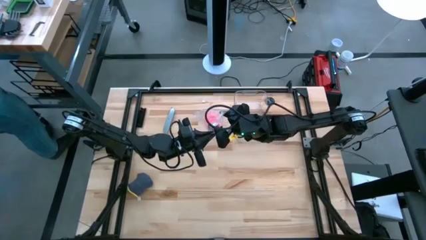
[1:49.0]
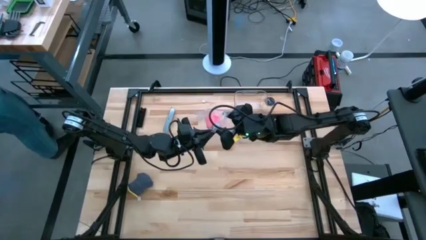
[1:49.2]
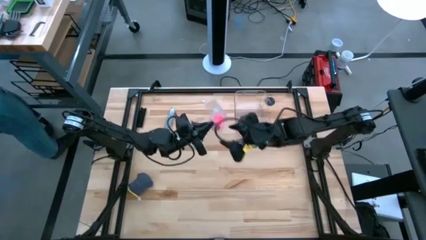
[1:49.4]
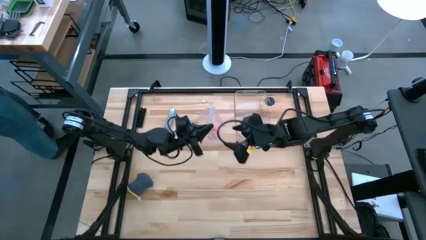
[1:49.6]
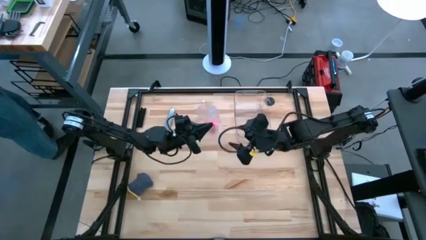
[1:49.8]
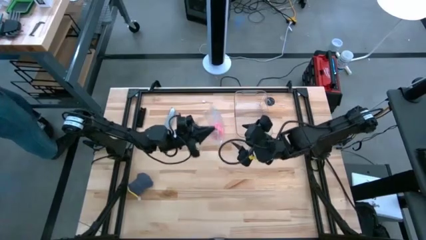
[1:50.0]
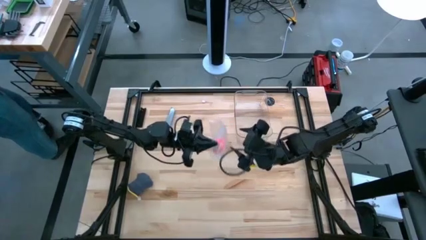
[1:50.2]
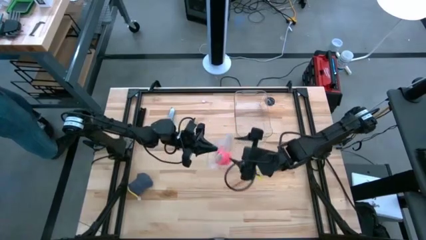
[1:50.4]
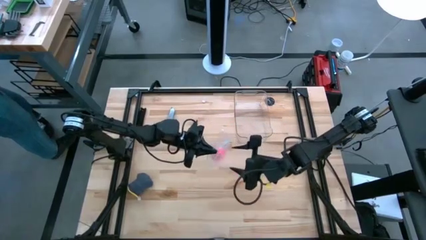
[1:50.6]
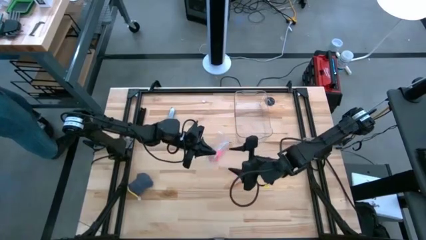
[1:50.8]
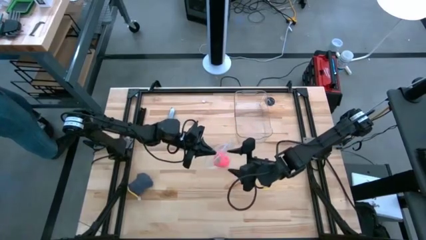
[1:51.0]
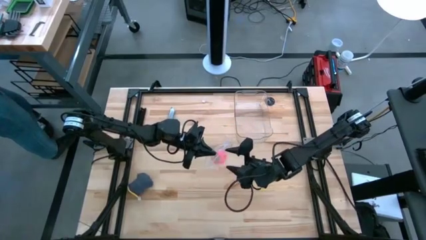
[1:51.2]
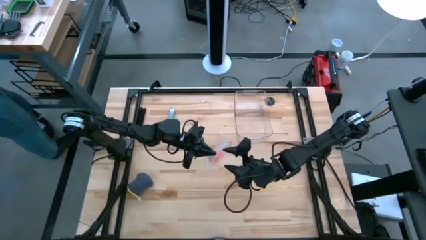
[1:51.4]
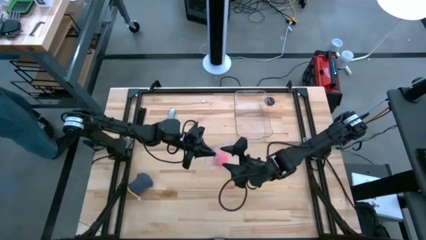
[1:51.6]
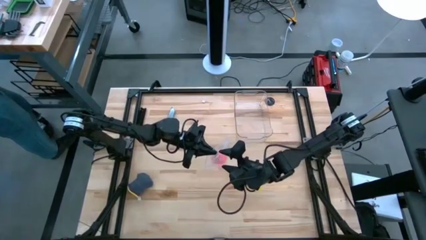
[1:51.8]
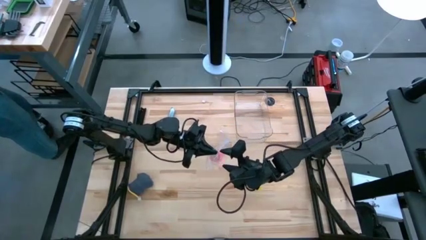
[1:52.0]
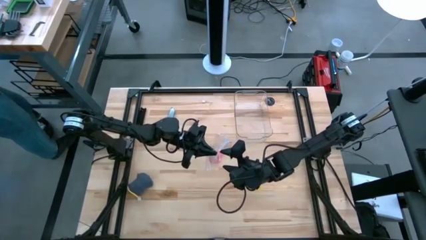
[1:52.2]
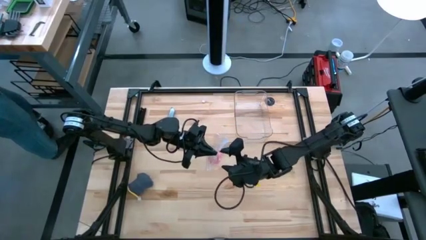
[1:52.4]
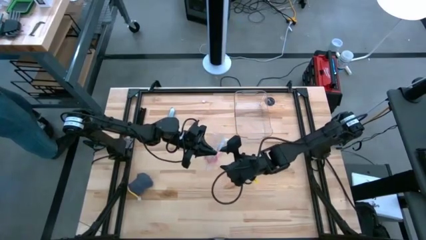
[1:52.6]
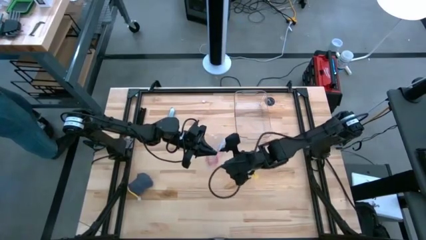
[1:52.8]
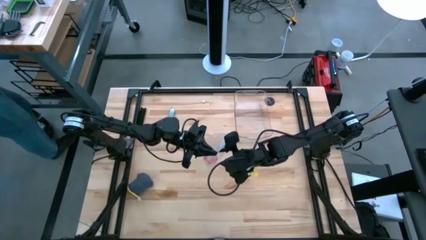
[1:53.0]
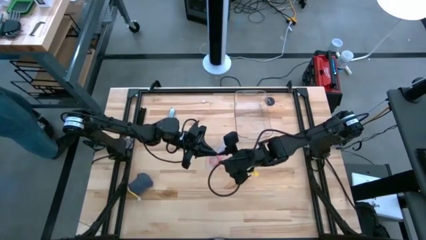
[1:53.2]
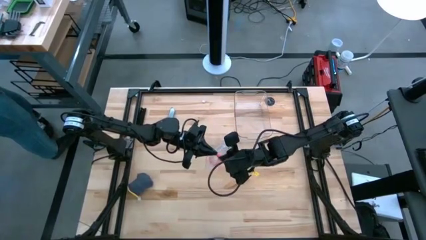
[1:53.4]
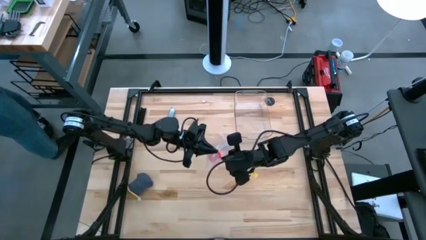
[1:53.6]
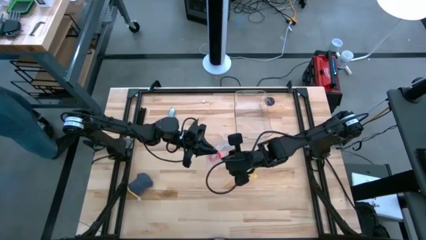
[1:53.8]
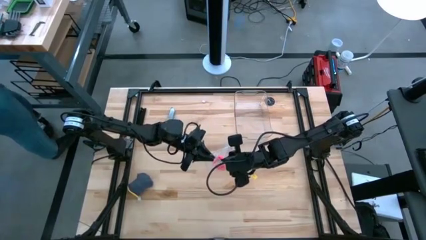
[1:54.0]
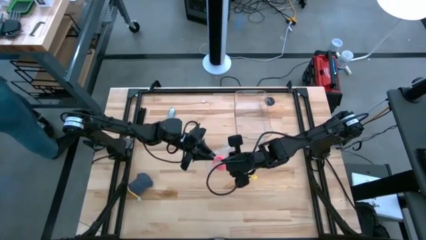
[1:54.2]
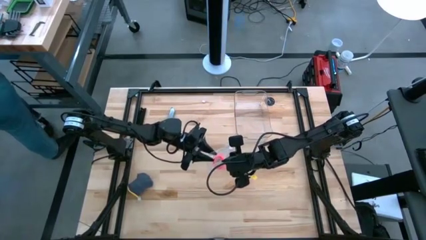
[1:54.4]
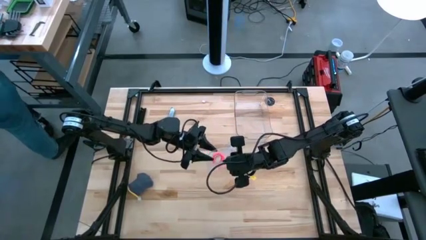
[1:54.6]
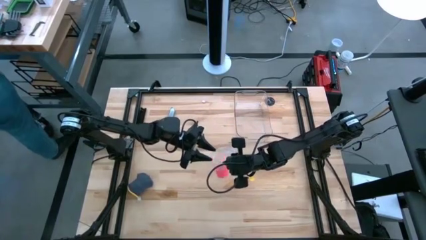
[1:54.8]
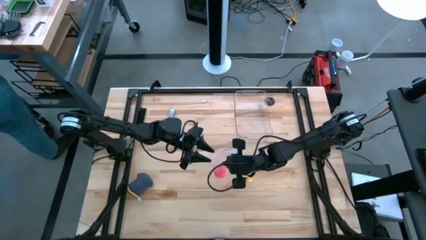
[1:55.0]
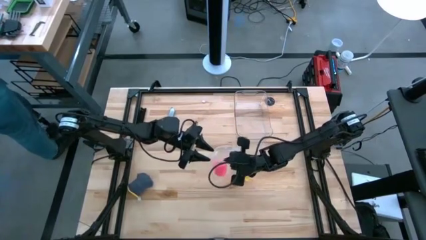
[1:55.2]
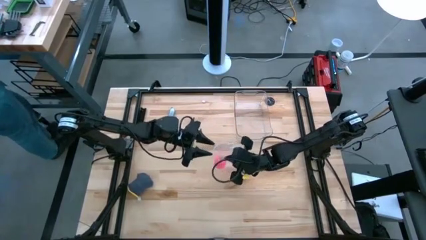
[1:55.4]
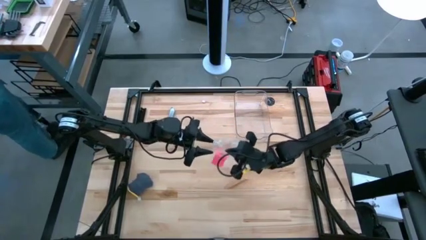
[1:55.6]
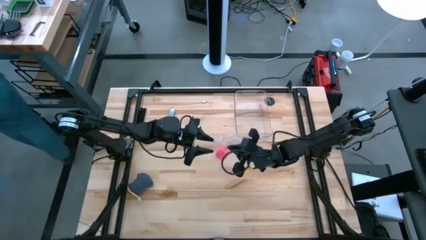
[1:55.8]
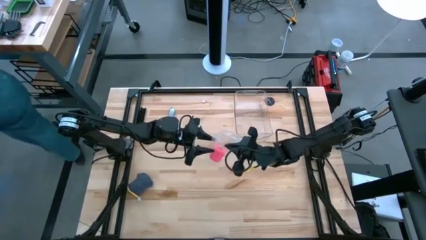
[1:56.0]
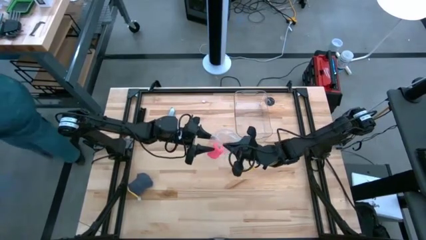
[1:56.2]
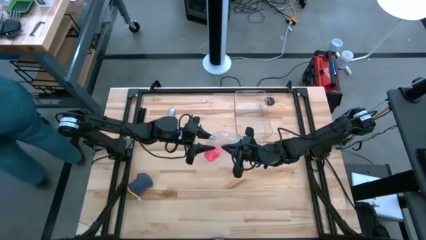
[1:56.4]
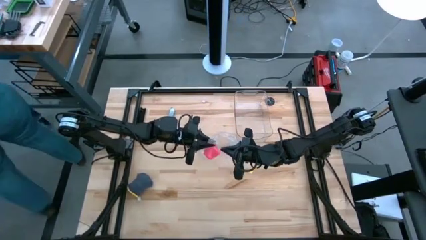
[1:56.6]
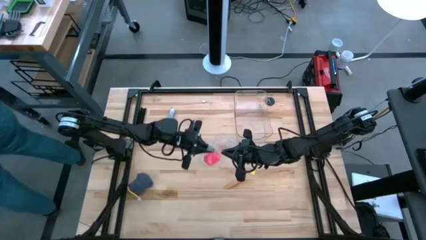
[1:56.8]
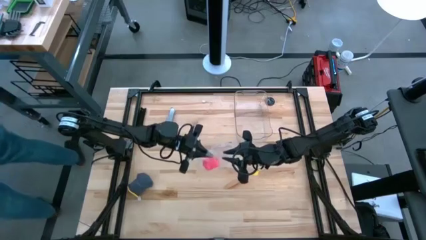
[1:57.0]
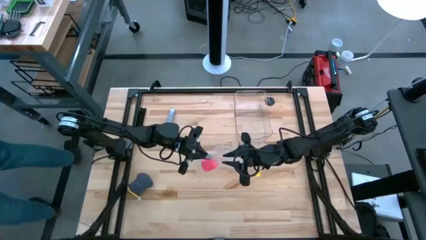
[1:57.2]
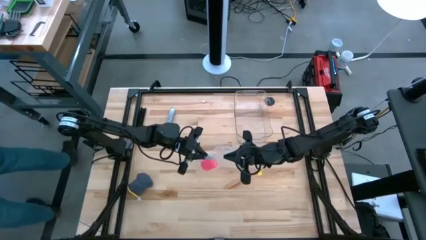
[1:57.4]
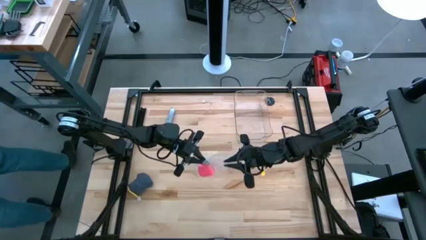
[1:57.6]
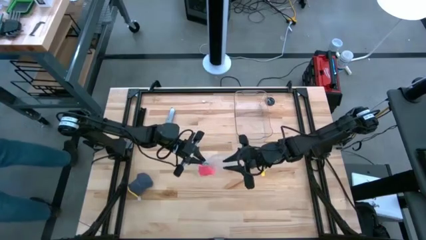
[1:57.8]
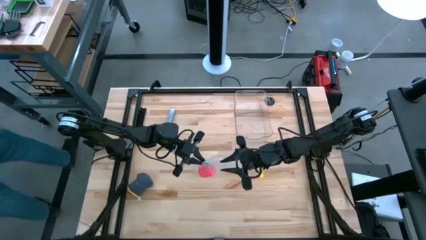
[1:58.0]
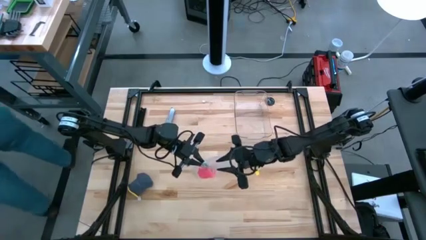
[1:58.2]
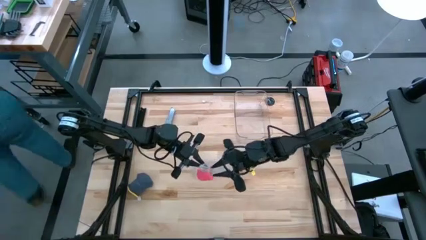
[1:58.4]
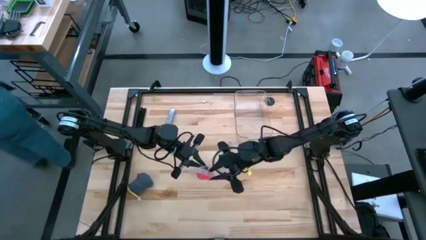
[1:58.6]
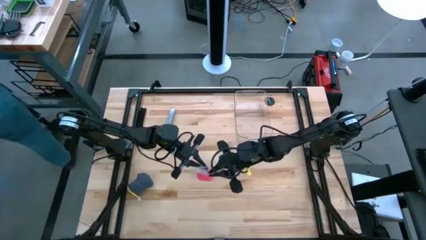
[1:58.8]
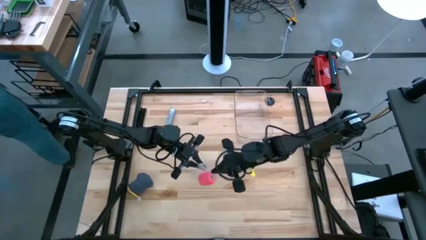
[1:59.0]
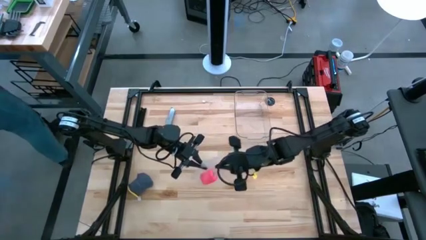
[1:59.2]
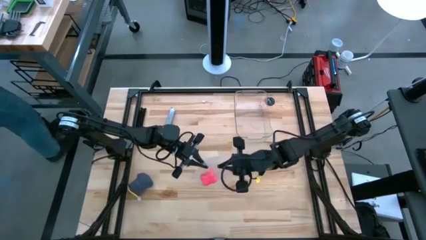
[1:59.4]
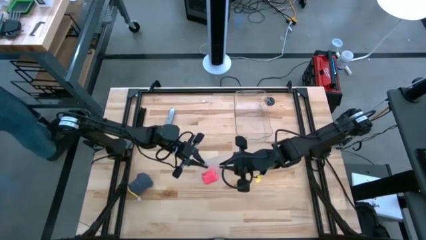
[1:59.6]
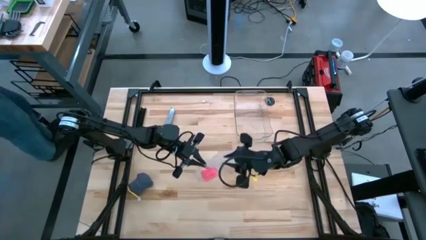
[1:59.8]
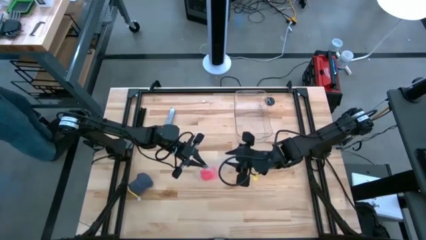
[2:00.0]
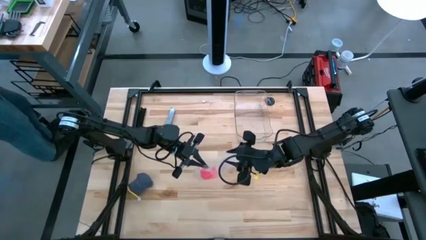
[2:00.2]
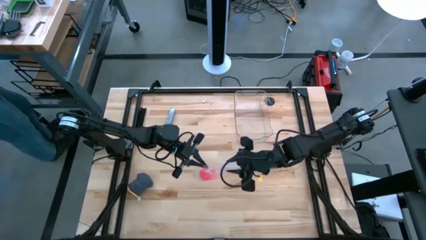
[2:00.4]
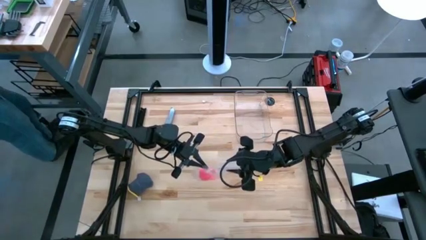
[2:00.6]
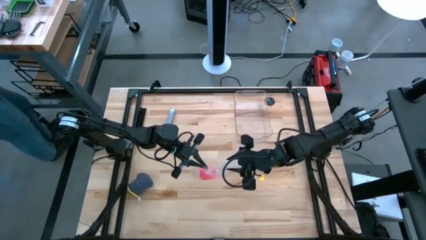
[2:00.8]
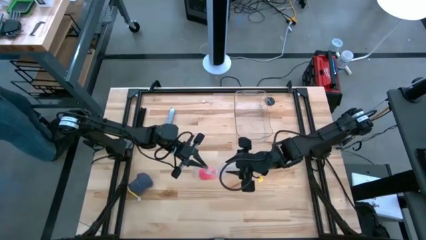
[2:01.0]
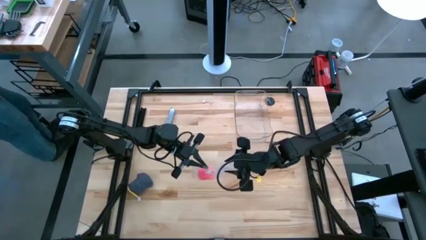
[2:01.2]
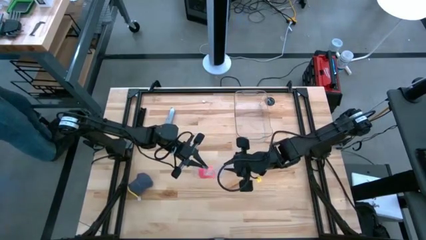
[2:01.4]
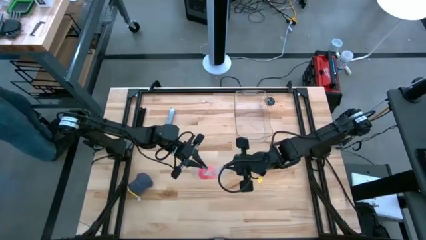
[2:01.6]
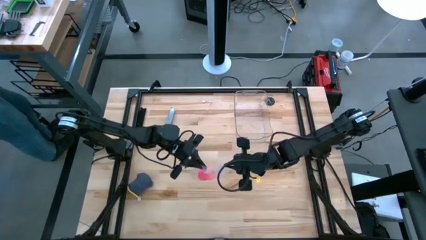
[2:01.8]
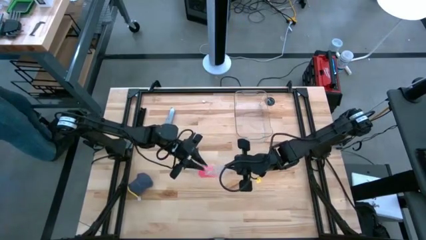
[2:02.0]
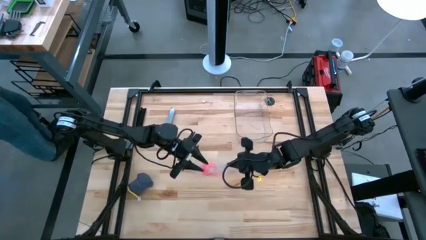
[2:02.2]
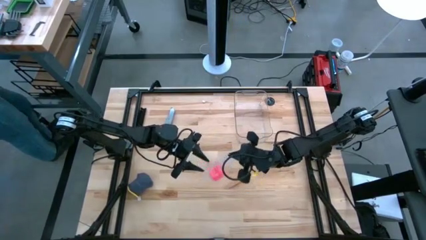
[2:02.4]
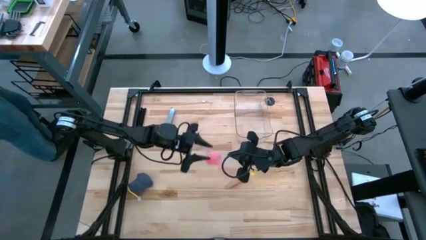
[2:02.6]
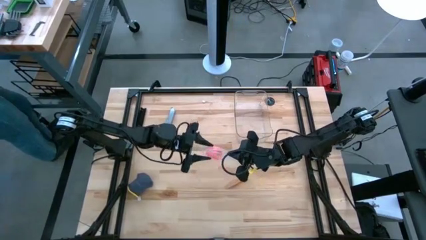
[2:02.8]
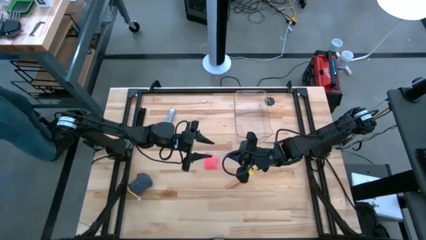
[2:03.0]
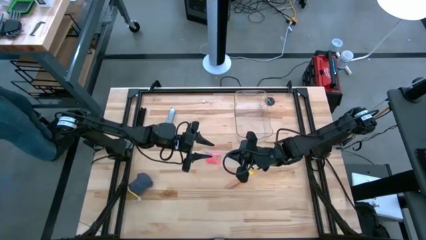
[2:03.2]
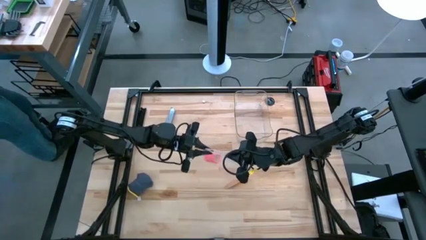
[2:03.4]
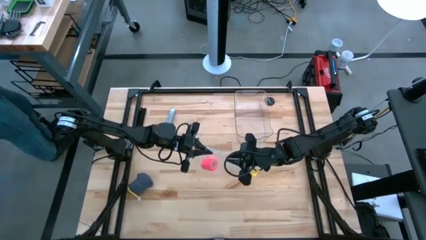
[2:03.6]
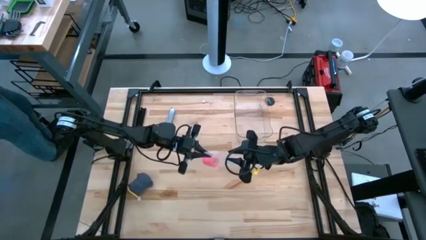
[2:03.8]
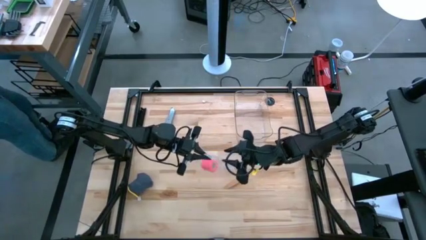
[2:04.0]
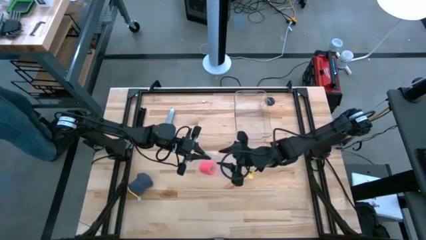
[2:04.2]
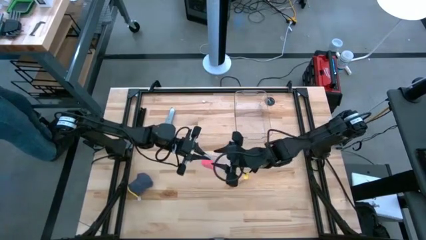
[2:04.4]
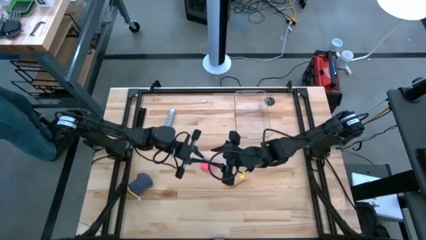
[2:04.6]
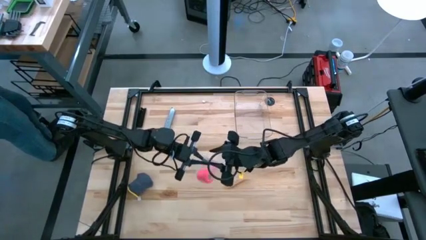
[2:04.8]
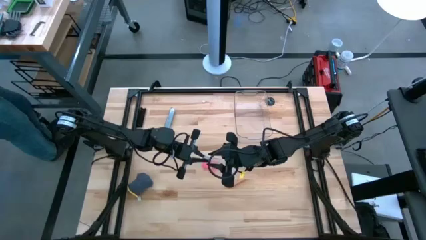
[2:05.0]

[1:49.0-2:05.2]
Task: Roll bandage
Close the transparent zip bag
